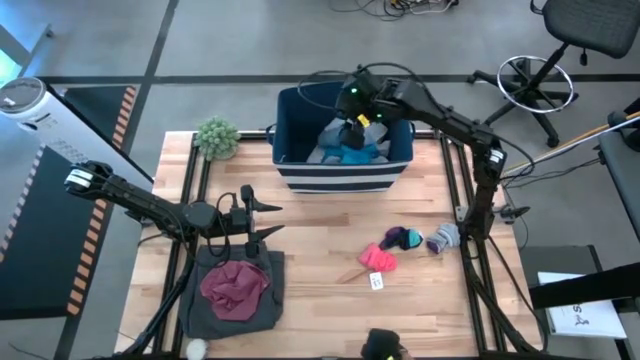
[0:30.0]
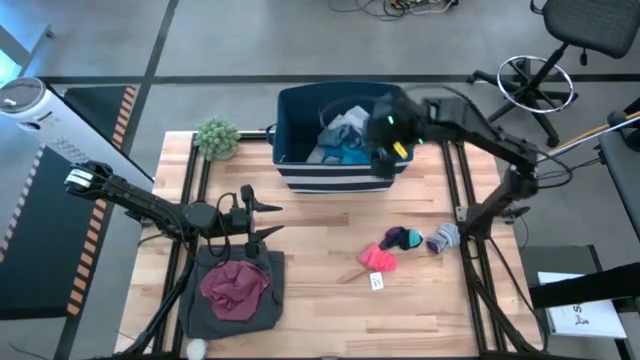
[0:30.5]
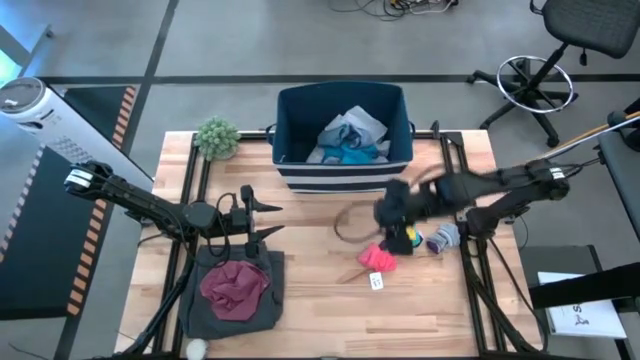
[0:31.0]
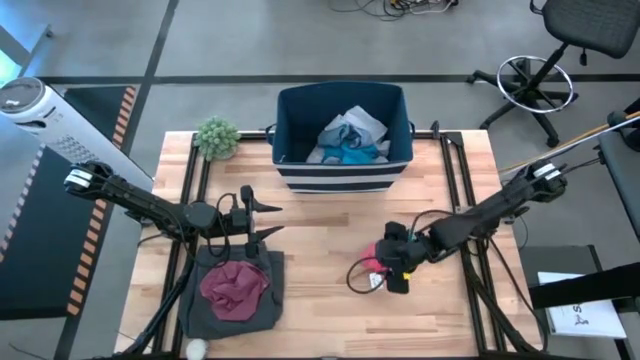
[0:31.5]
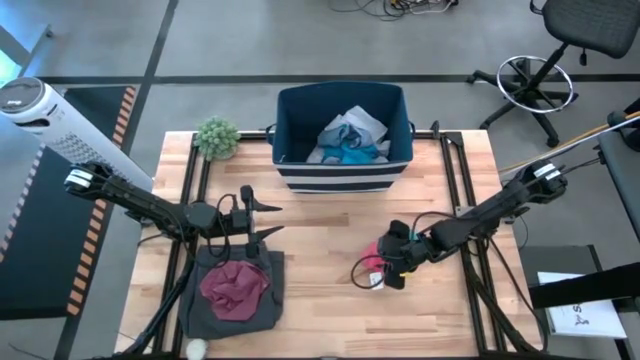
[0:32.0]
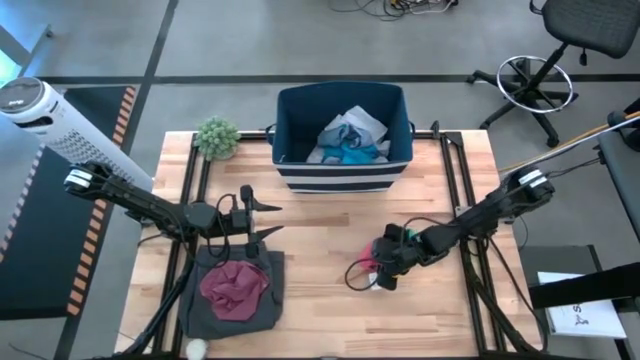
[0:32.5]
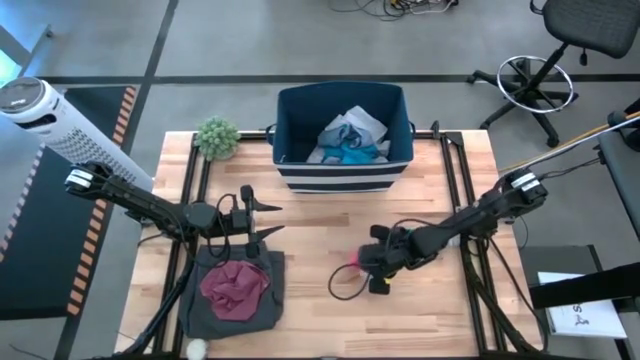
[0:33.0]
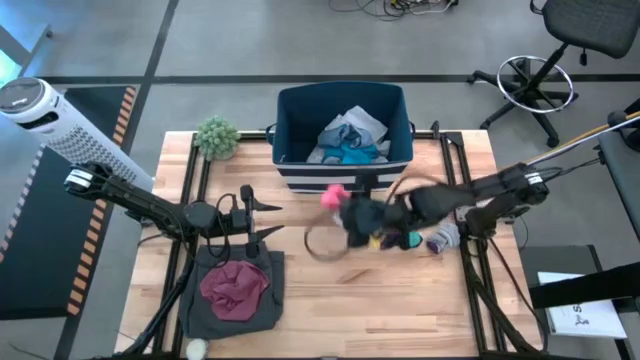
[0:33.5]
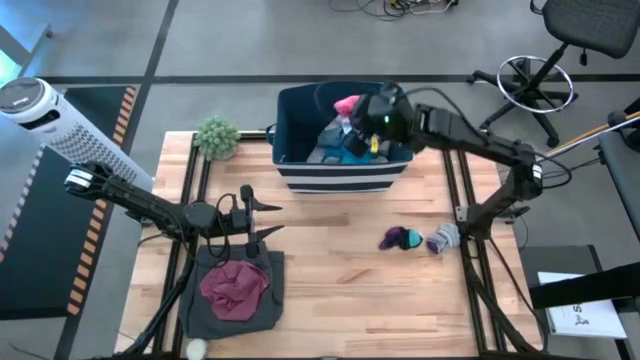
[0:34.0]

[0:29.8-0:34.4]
Task: Sort clothes
Put the pink socks into the laundry bin

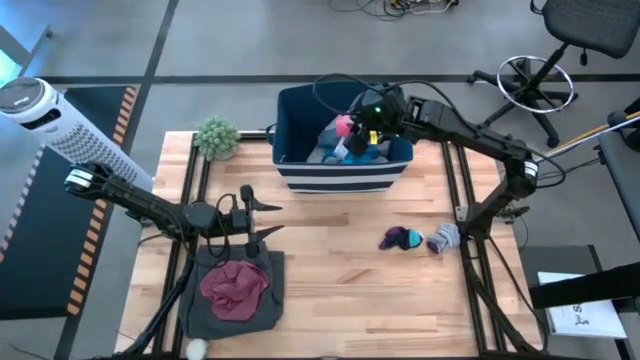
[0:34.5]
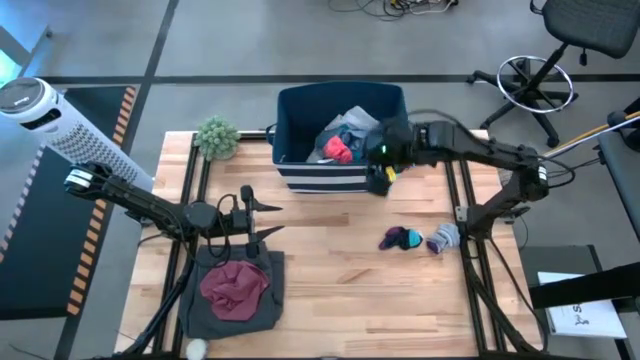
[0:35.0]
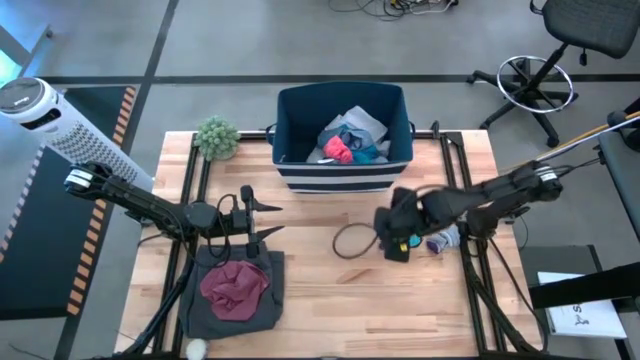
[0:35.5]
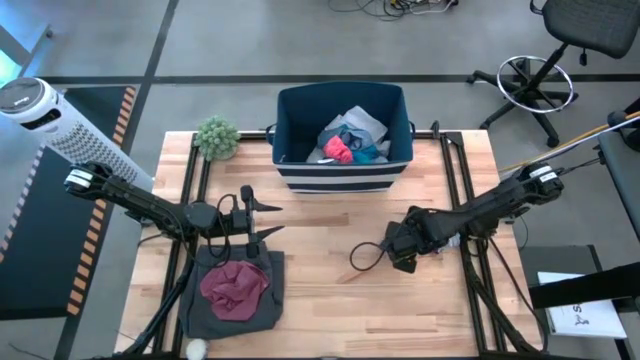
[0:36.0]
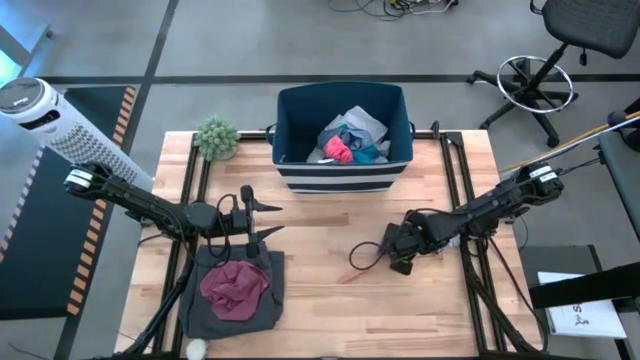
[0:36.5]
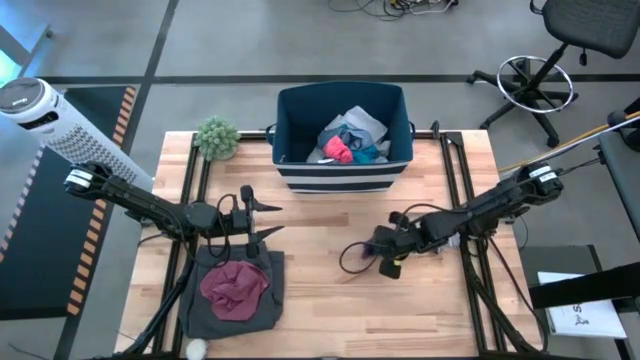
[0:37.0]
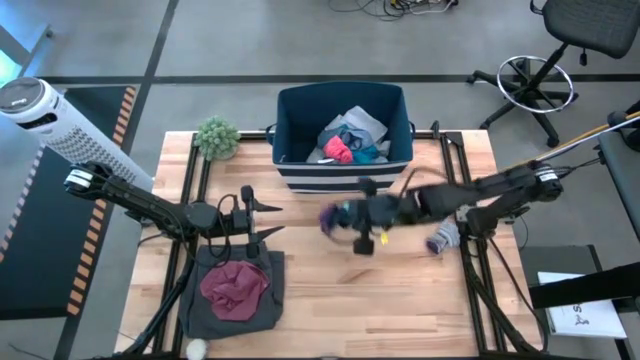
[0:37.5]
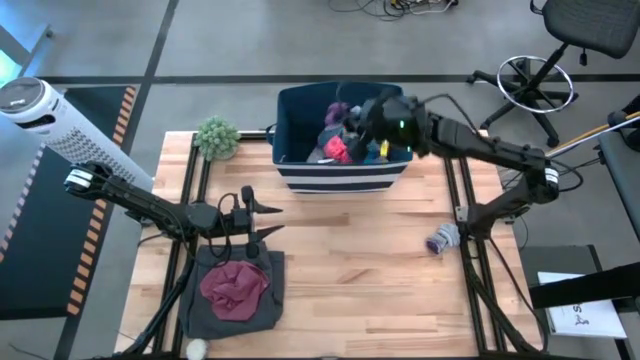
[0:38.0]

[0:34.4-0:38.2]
Put the black socks into the laundry bin

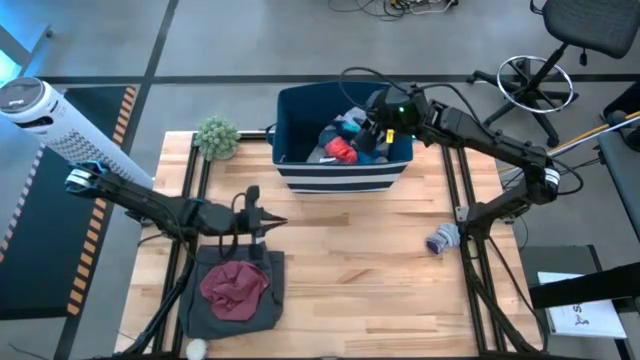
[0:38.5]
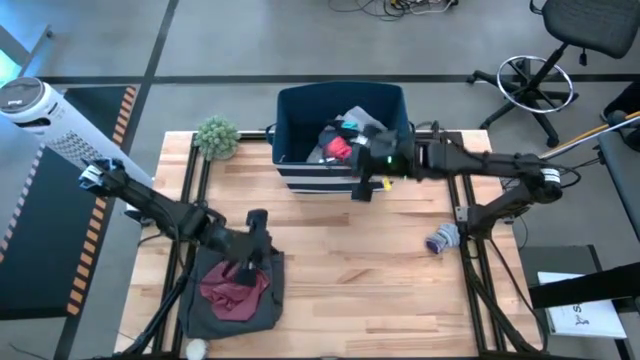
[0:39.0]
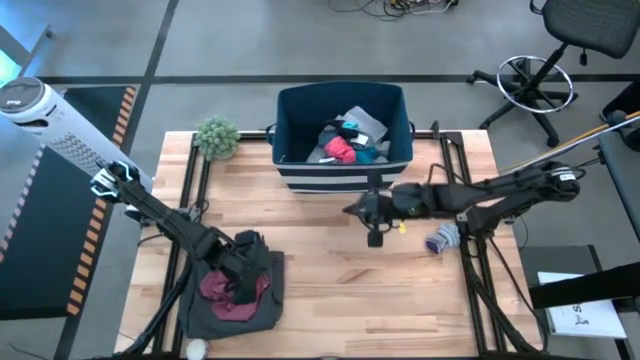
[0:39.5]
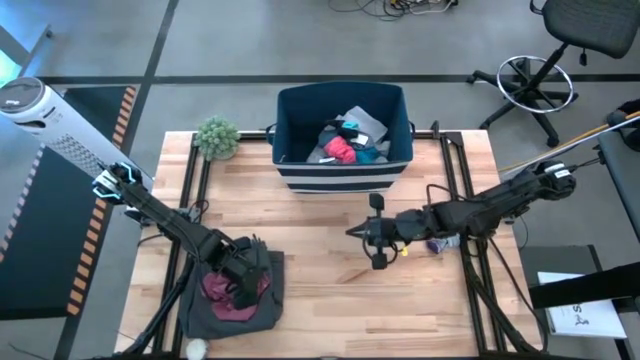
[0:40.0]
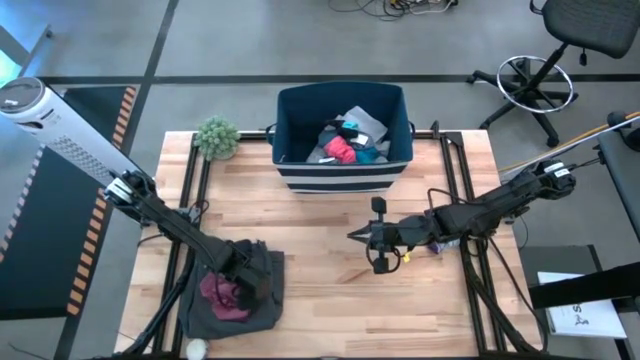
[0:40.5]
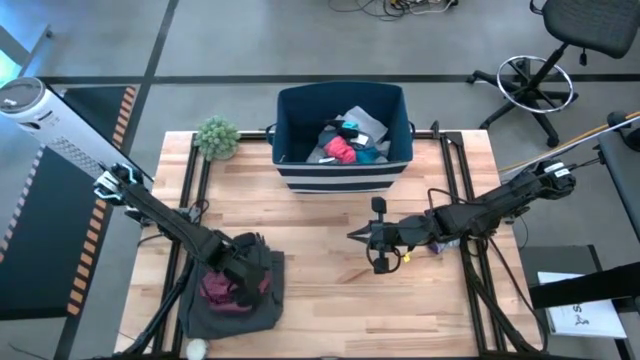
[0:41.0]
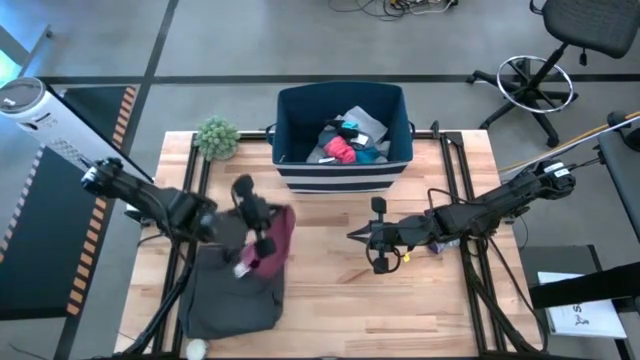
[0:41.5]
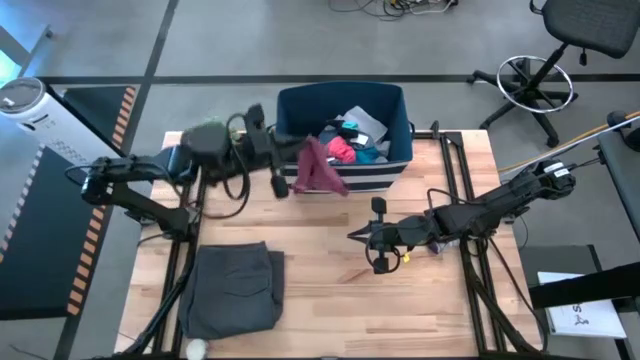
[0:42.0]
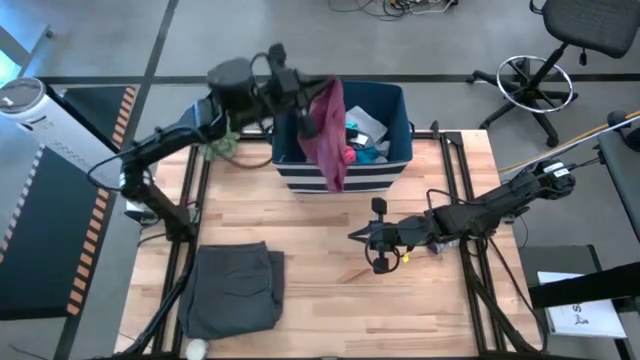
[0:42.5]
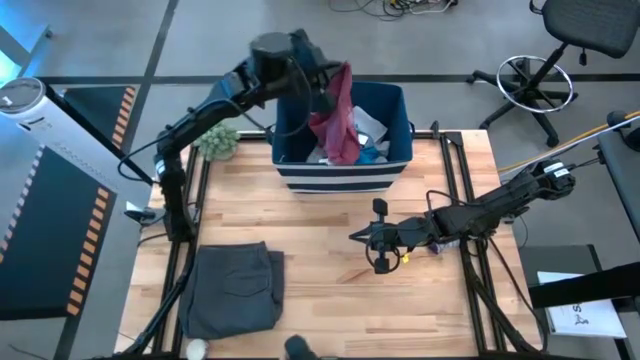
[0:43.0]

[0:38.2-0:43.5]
Put the red underwear into the laundry bin

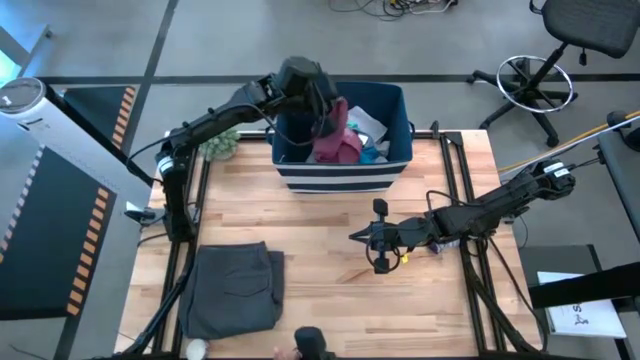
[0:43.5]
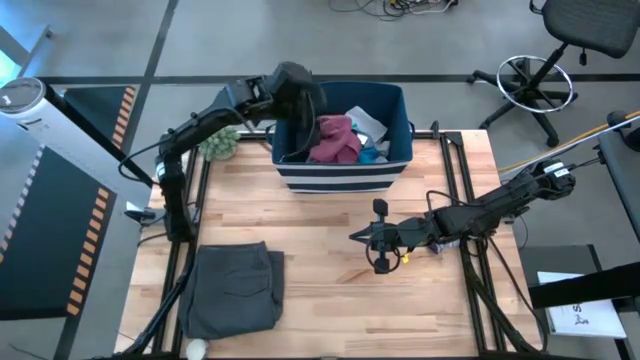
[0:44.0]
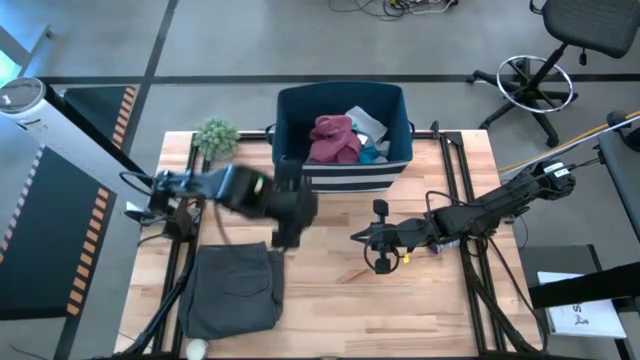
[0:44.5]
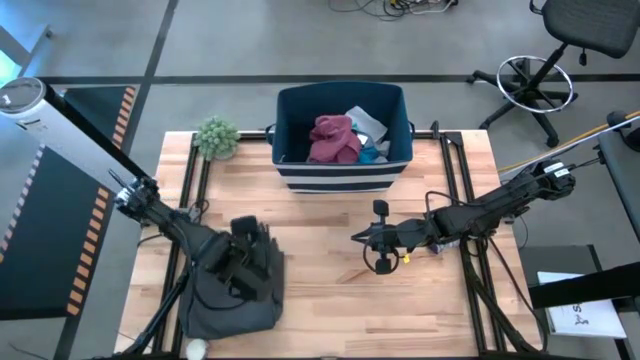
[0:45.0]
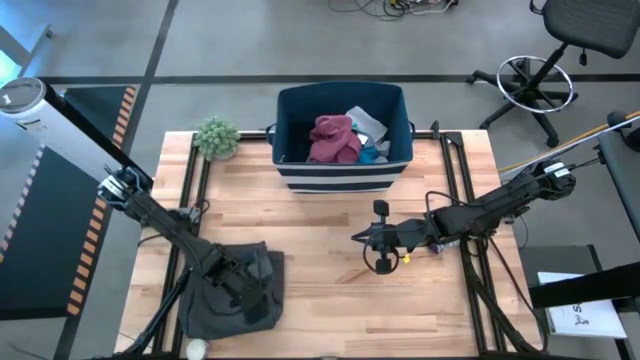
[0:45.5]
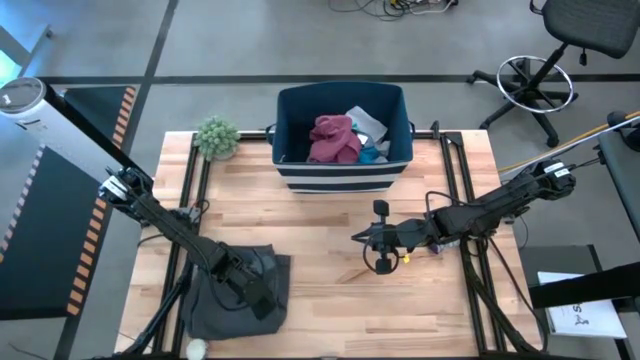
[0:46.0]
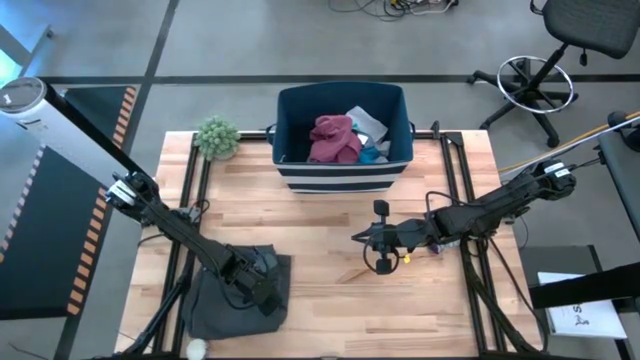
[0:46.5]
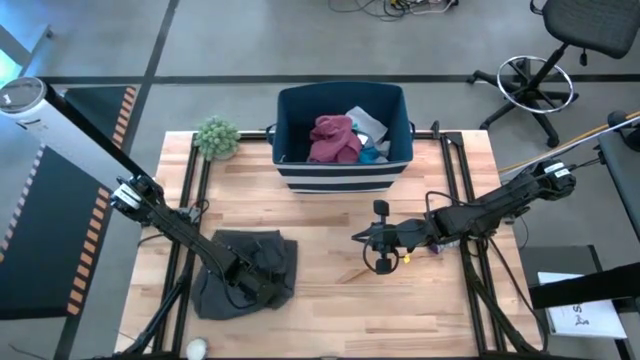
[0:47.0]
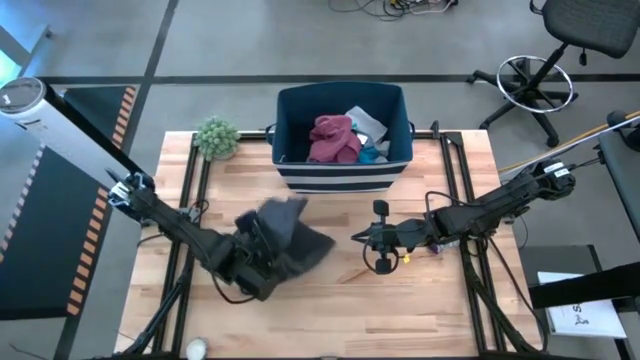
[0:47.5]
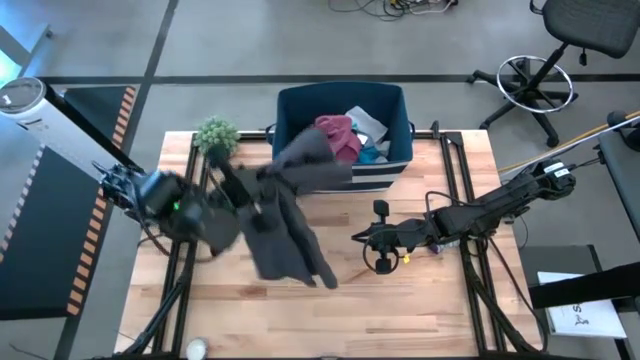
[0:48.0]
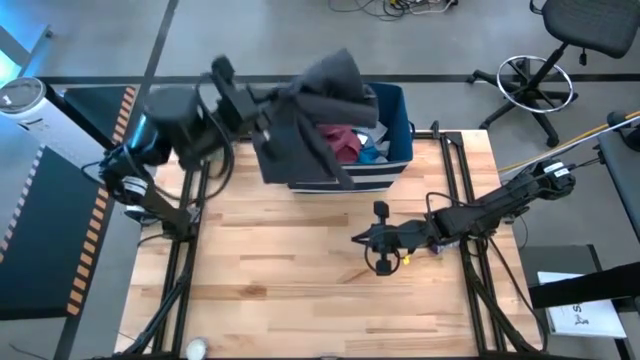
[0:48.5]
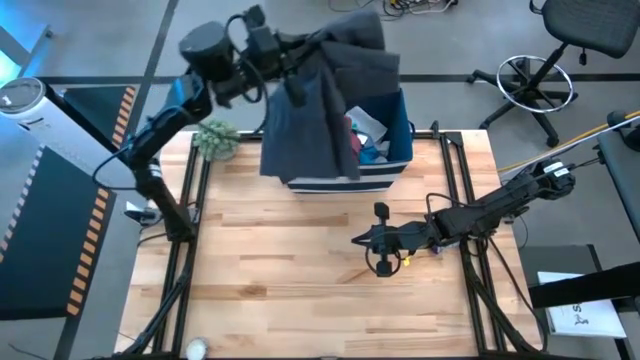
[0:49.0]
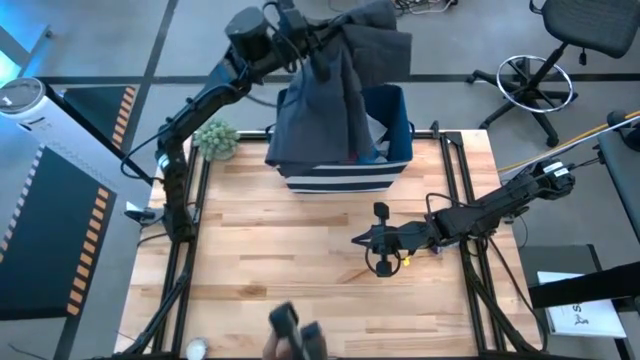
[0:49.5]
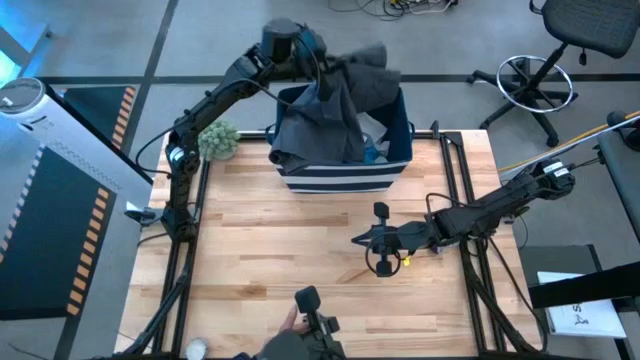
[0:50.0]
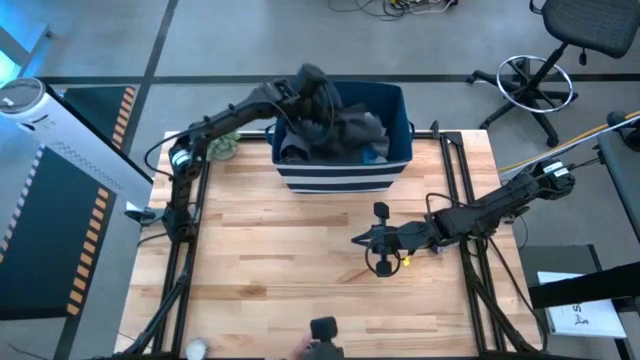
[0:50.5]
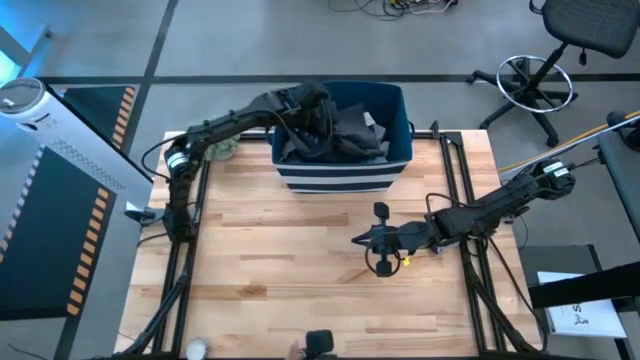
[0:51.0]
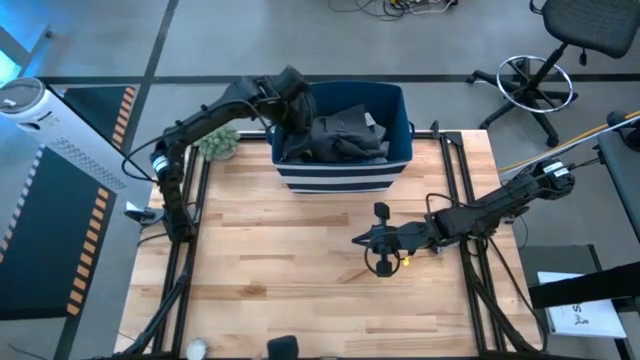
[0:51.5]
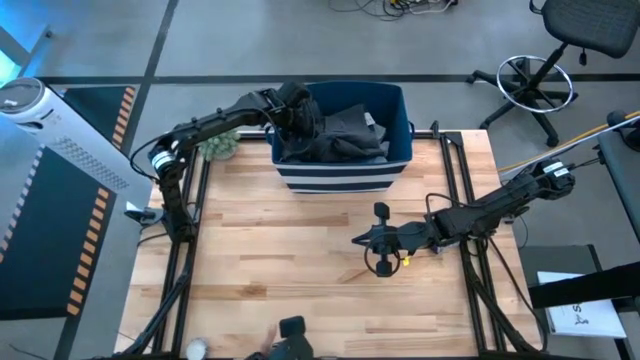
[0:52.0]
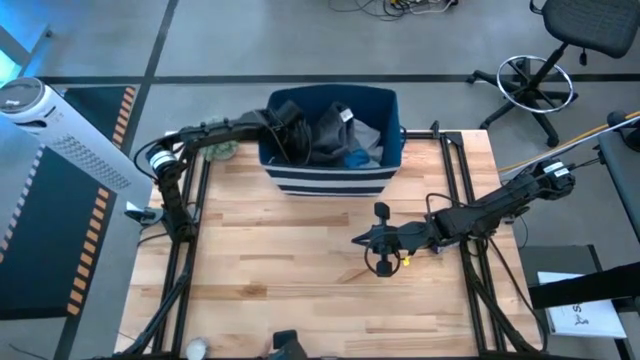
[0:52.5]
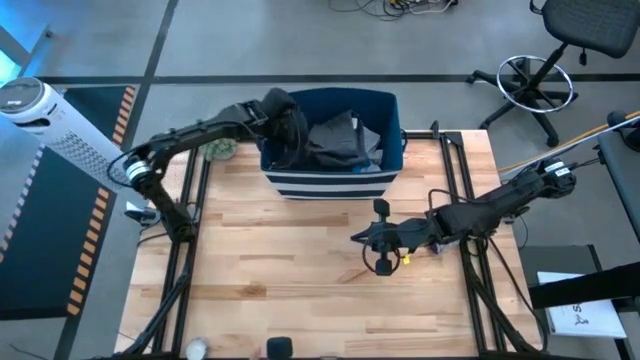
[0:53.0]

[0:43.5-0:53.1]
Put the black pants into the laundry bin
